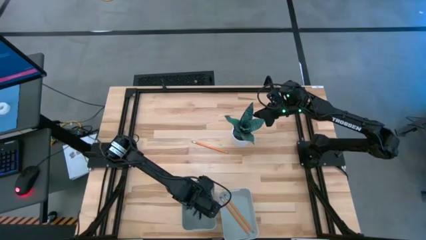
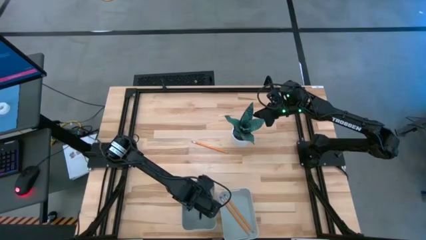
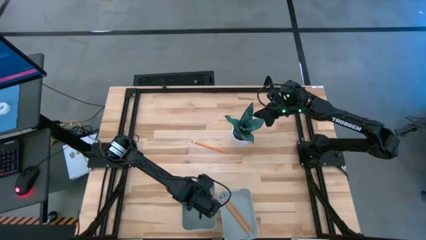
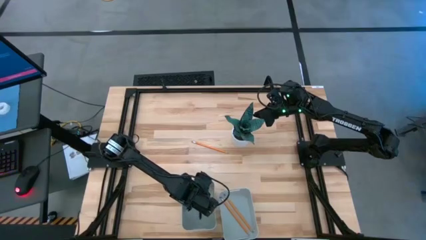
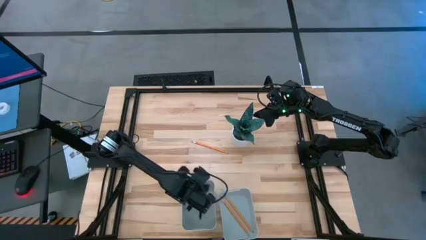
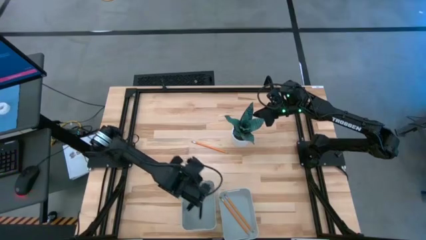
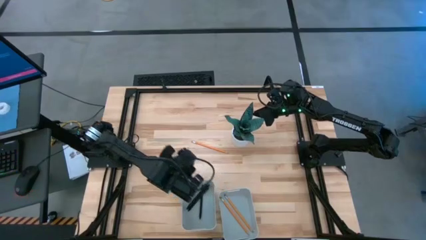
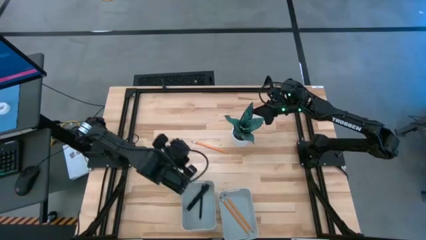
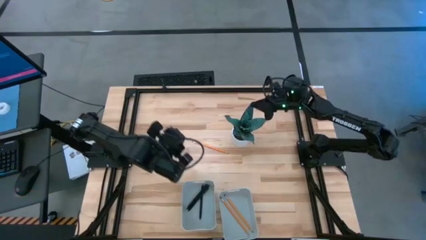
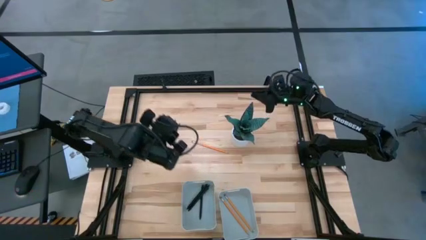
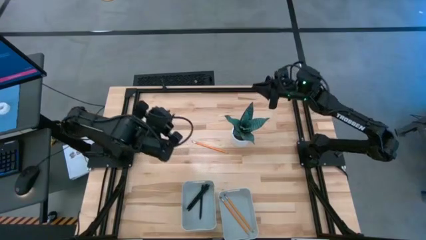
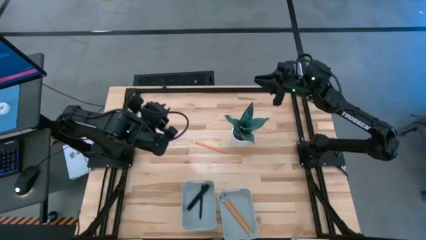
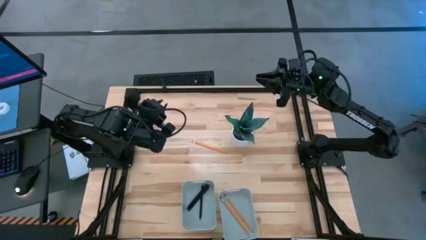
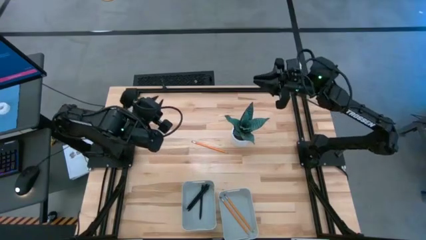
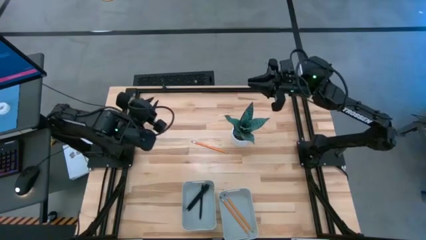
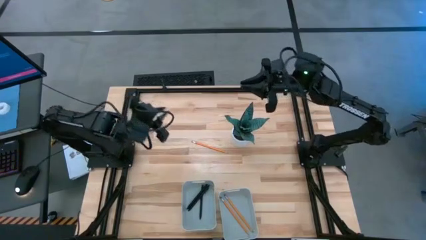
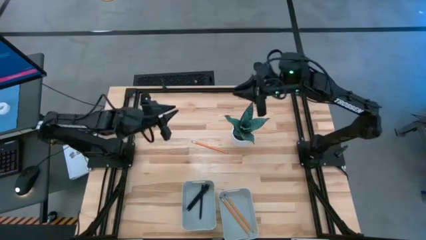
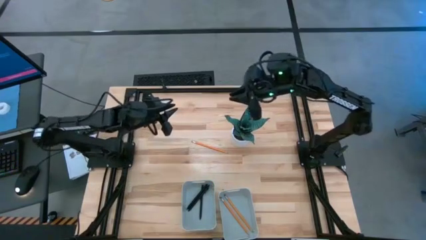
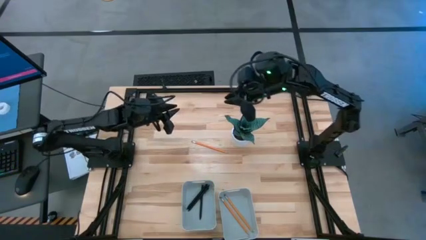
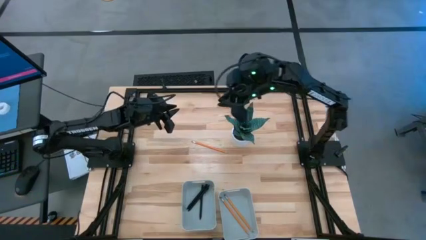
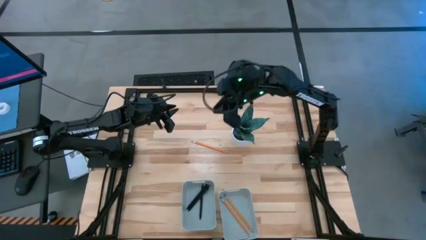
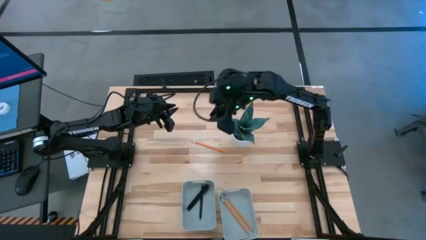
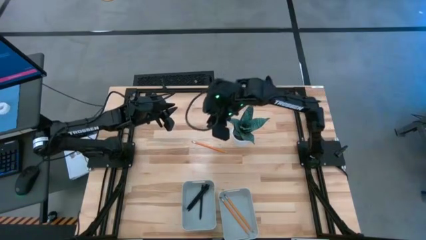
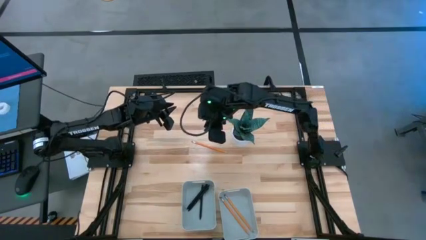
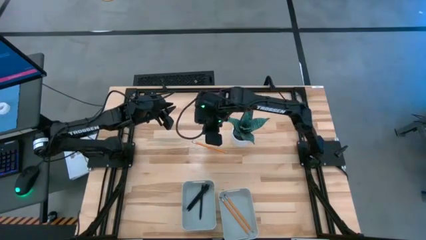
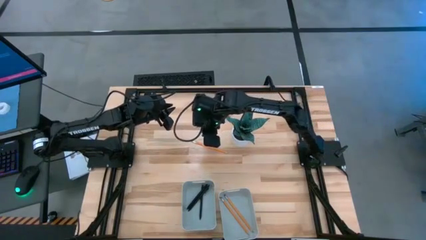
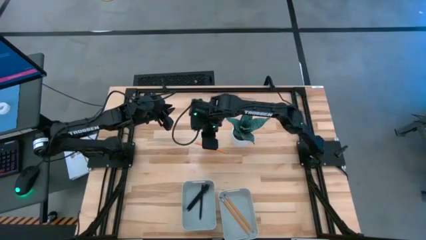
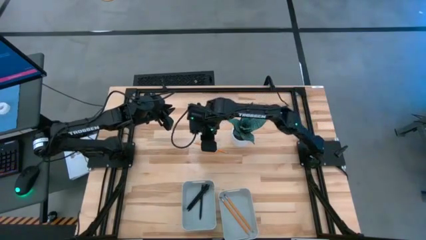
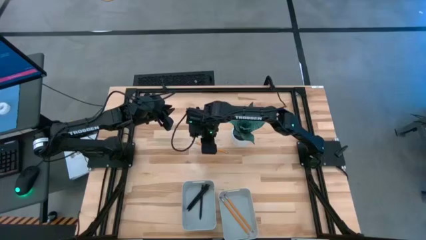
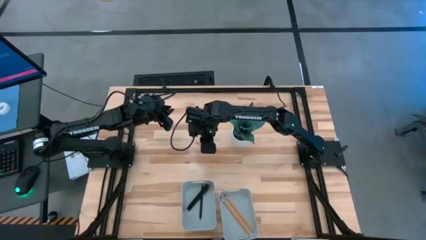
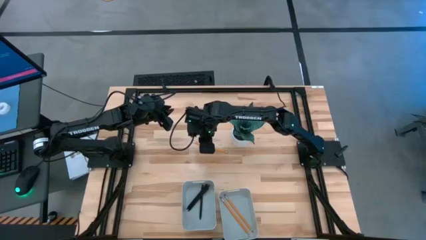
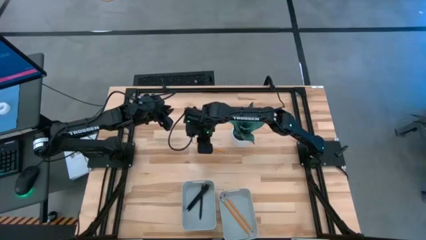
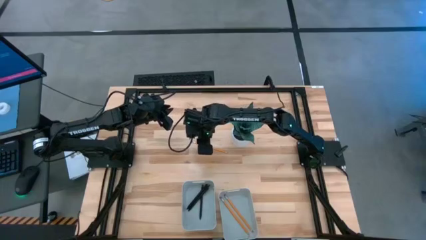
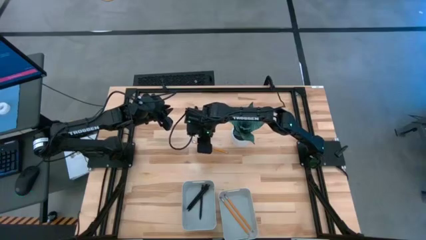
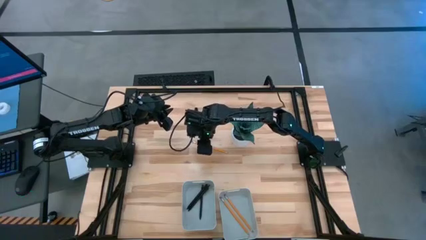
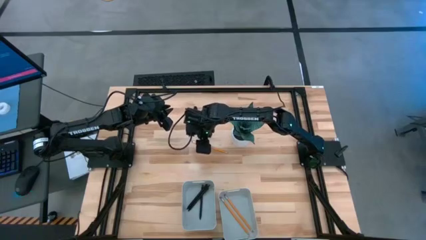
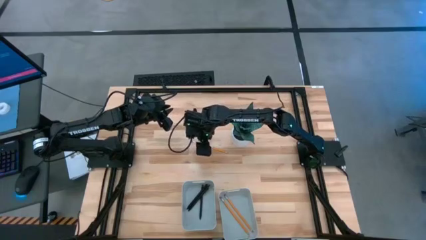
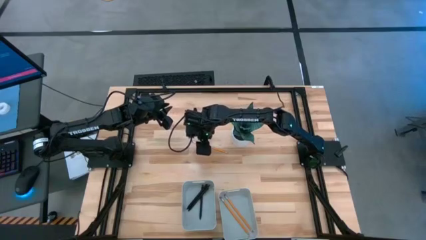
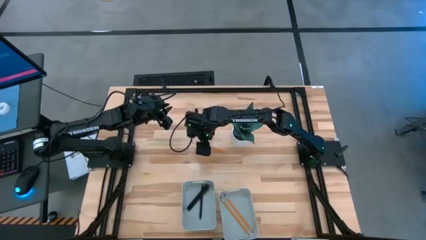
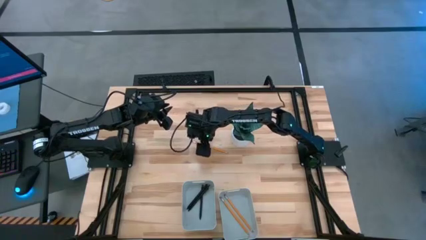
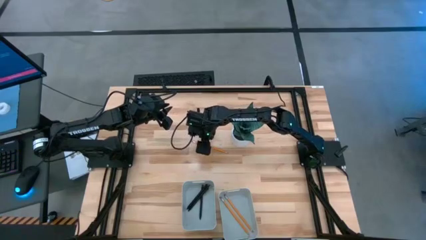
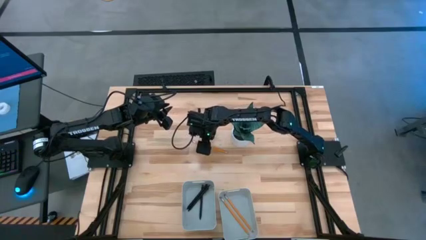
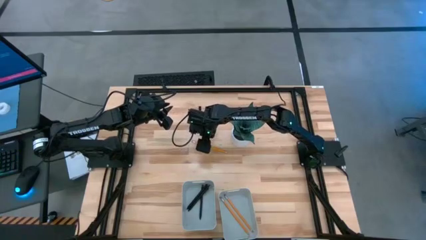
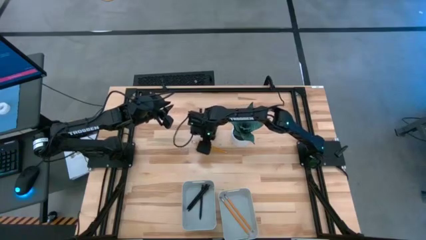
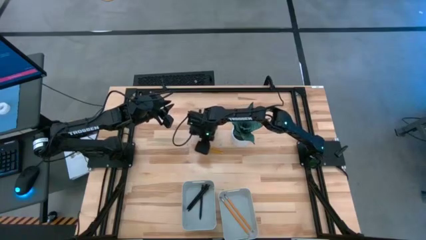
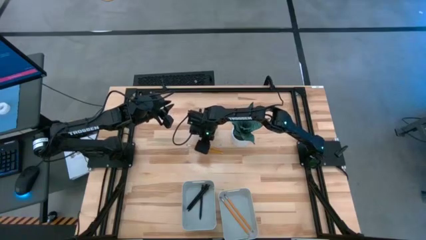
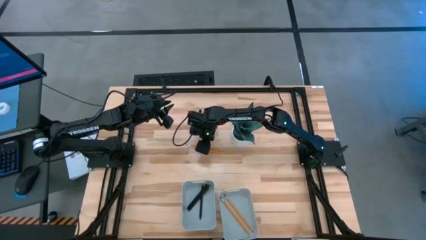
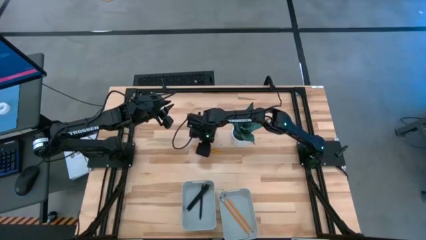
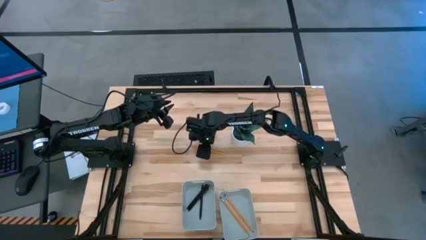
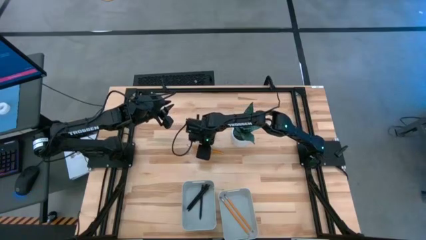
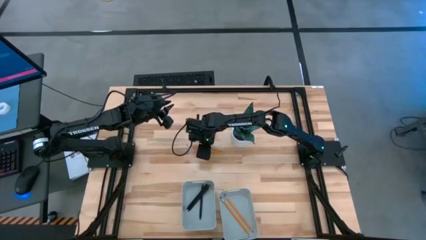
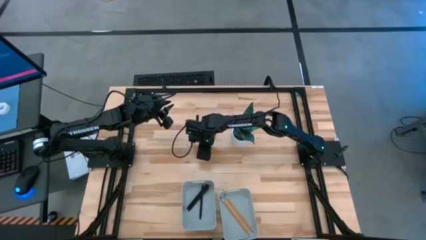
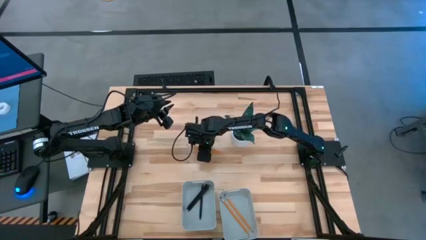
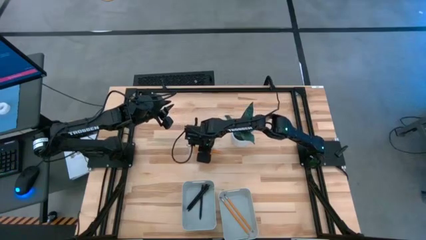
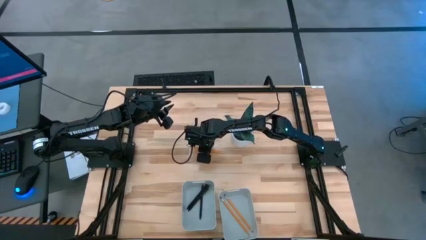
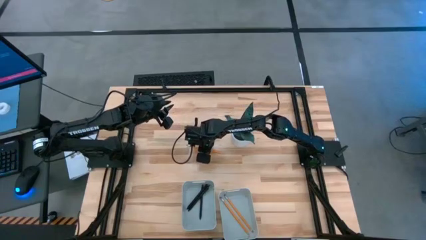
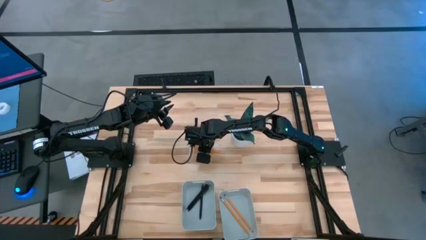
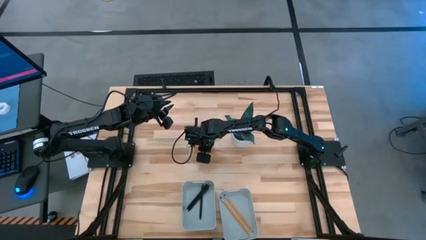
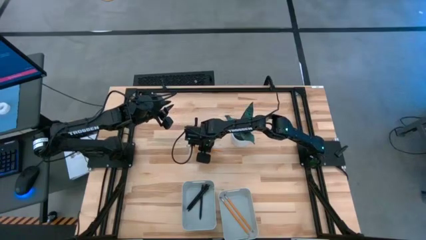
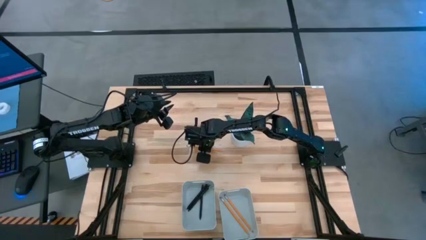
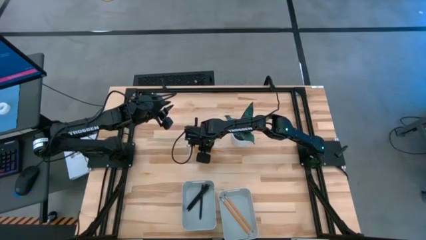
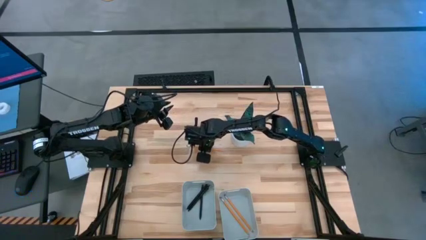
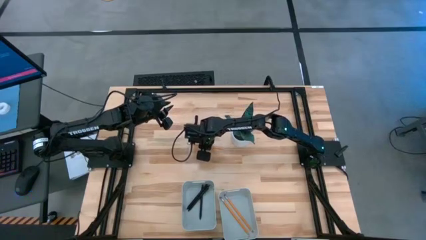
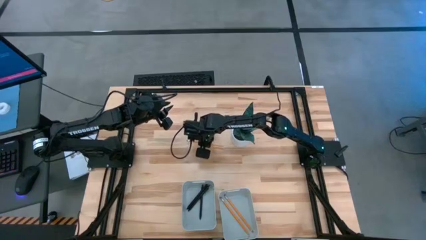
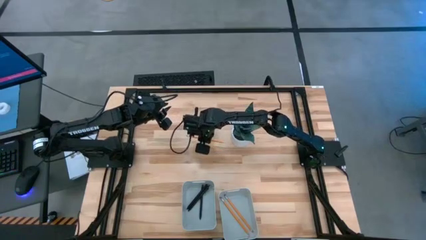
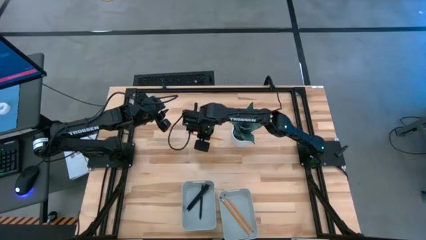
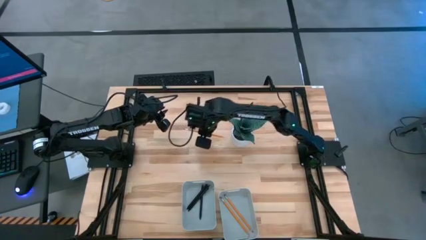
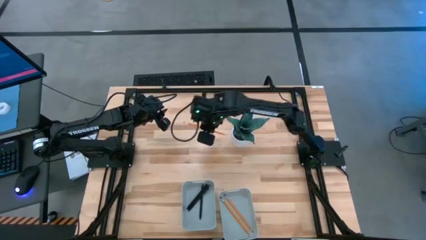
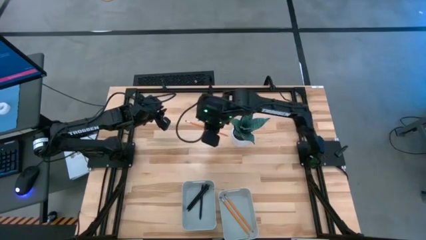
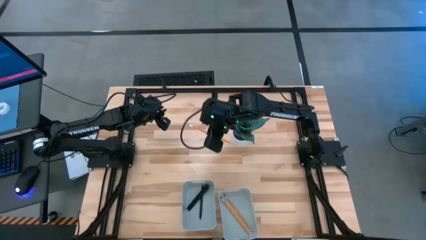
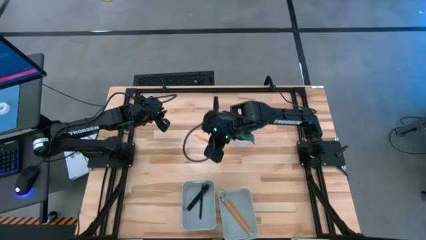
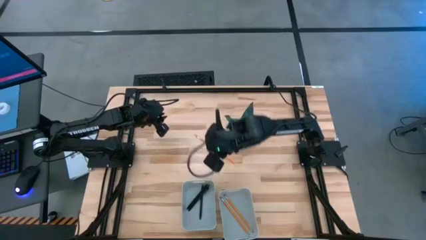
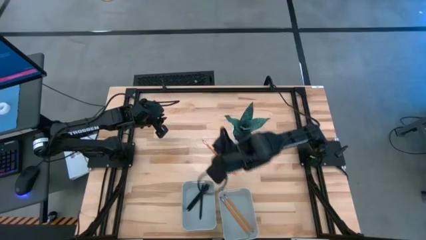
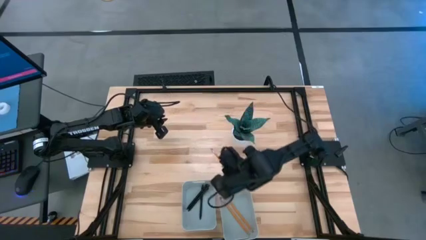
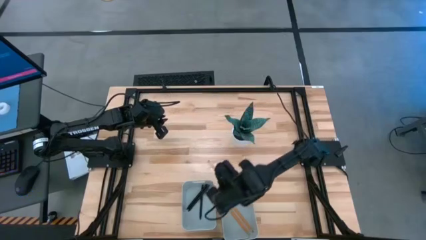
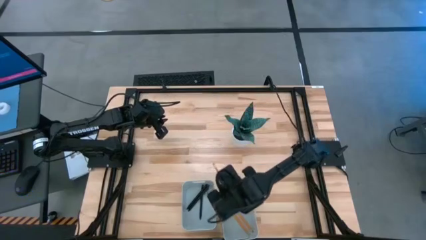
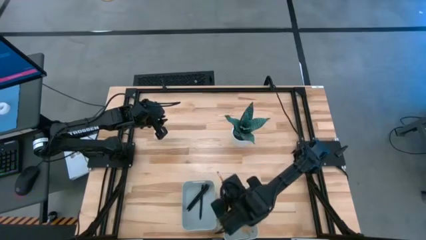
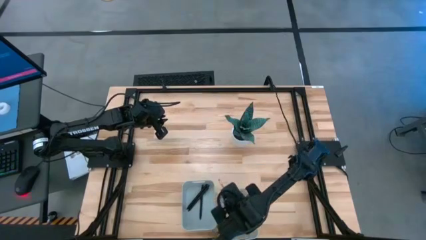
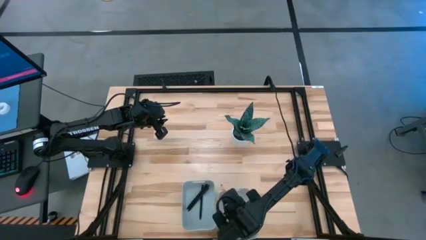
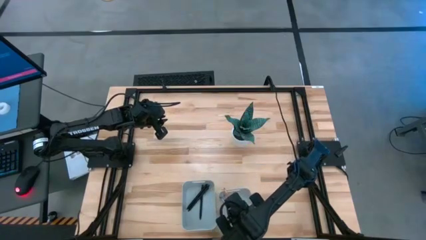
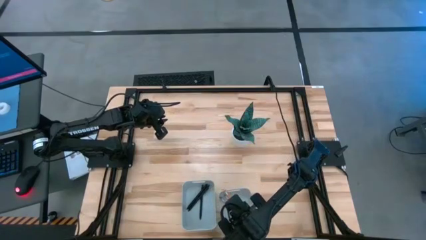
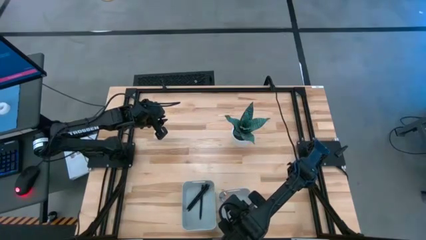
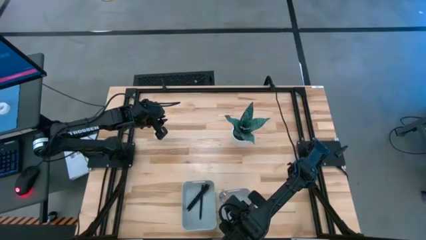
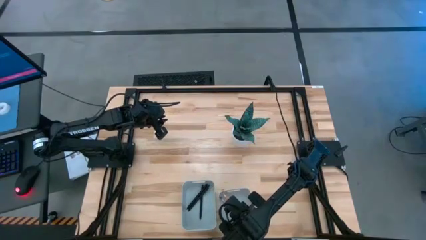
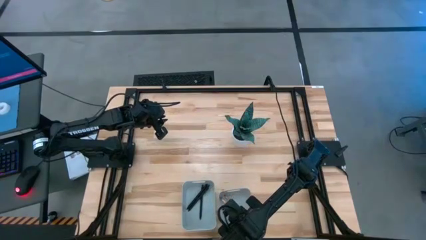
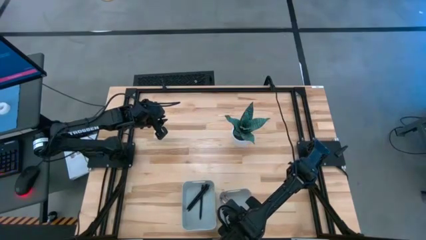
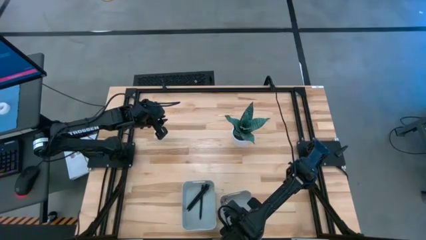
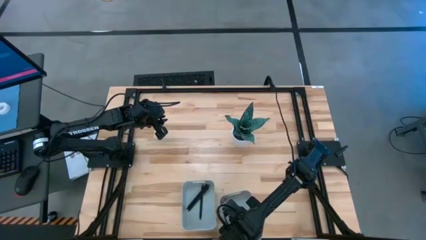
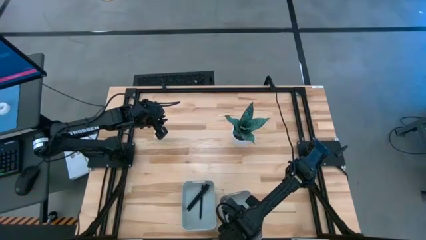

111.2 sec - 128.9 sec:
Task: Sort pens & pencils
Put the pencil into the right gray bin
